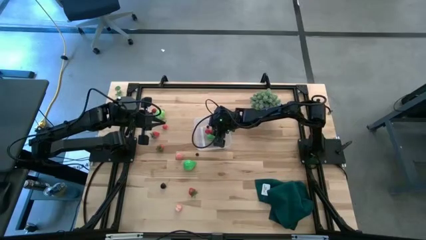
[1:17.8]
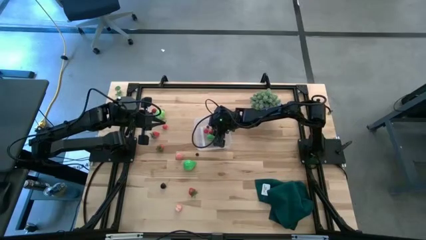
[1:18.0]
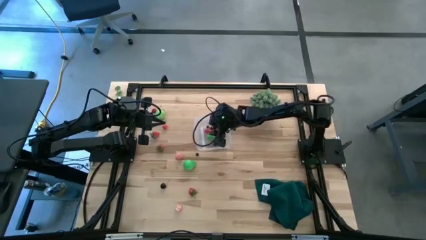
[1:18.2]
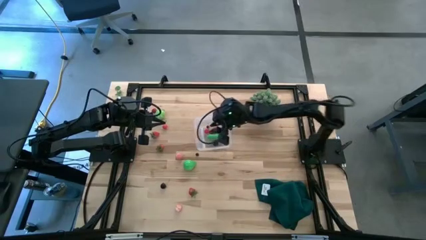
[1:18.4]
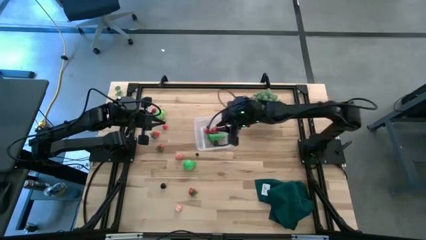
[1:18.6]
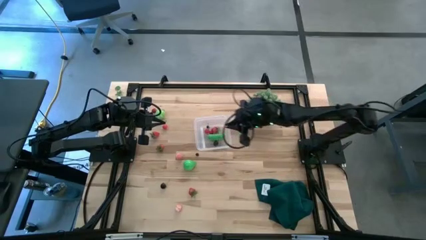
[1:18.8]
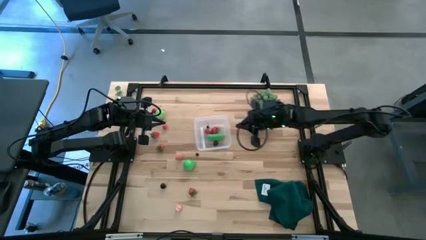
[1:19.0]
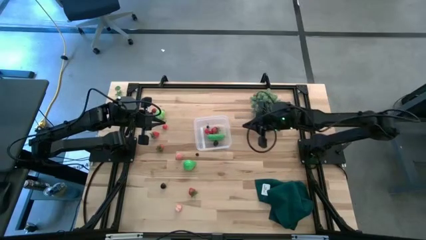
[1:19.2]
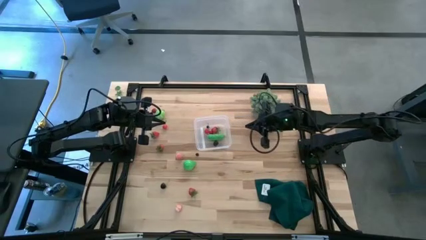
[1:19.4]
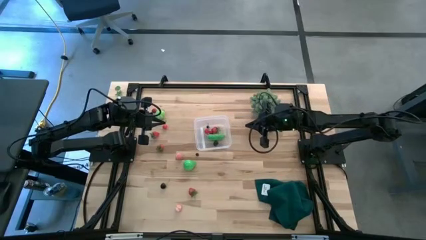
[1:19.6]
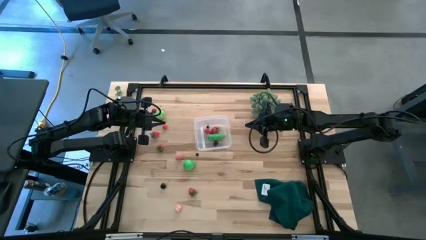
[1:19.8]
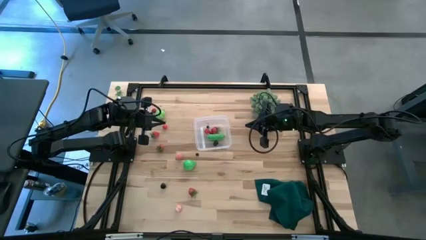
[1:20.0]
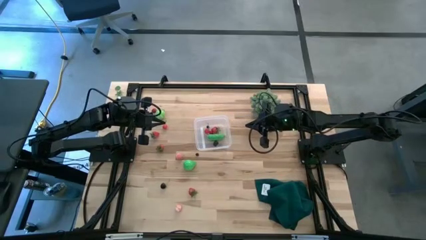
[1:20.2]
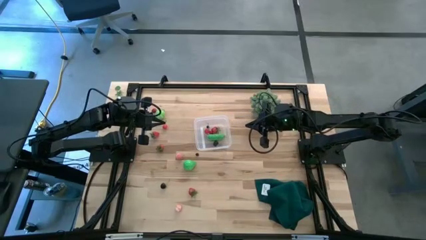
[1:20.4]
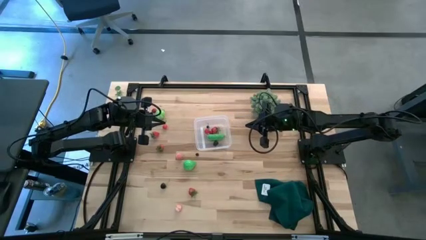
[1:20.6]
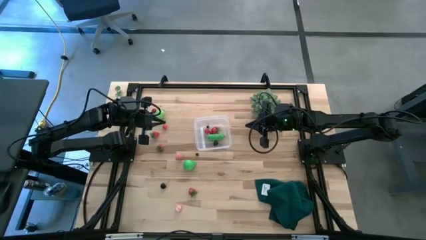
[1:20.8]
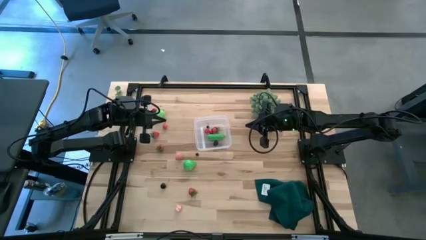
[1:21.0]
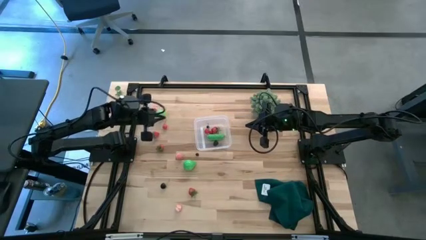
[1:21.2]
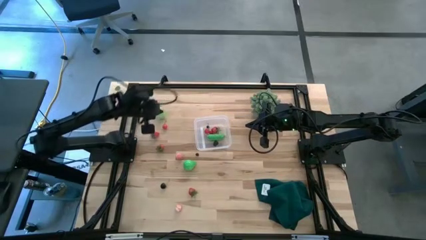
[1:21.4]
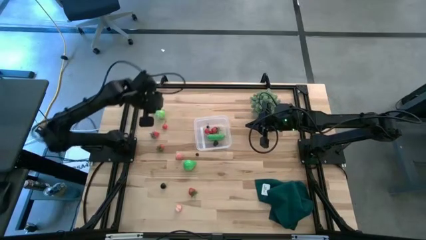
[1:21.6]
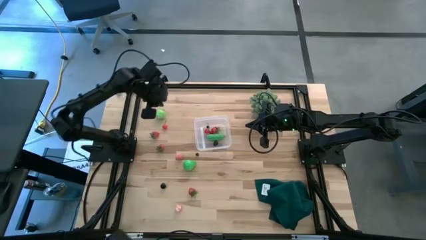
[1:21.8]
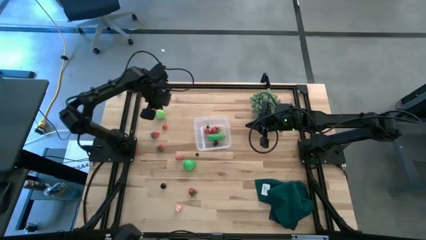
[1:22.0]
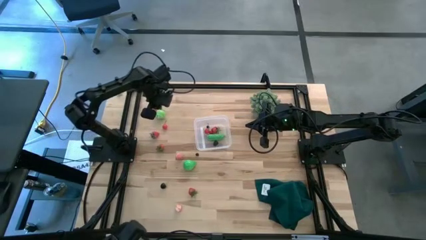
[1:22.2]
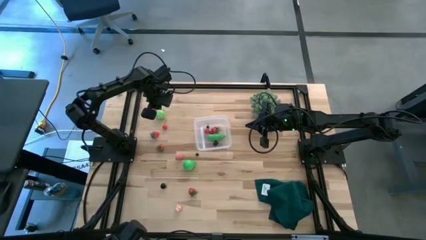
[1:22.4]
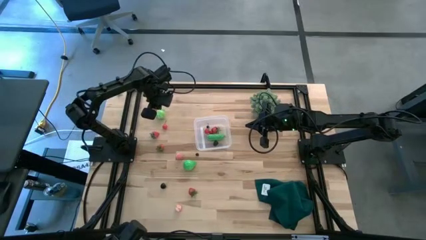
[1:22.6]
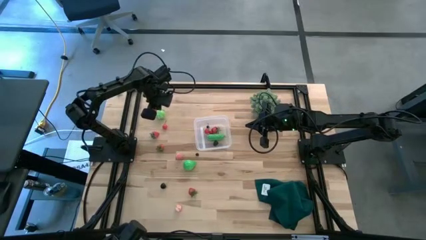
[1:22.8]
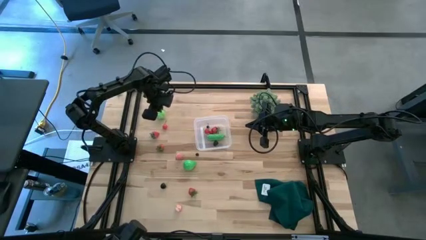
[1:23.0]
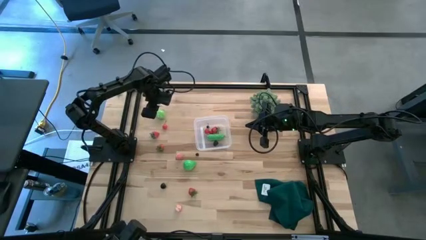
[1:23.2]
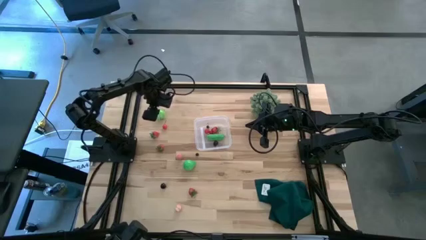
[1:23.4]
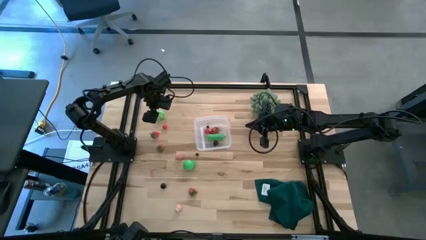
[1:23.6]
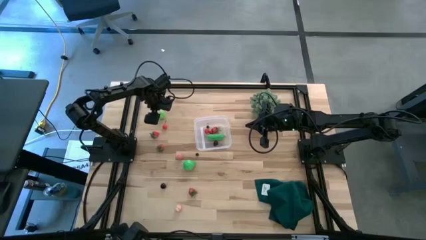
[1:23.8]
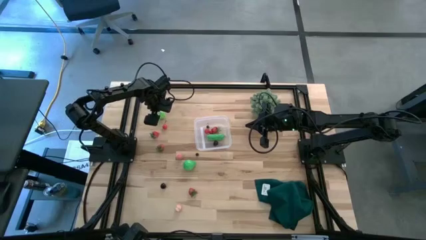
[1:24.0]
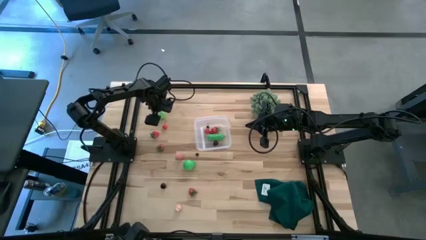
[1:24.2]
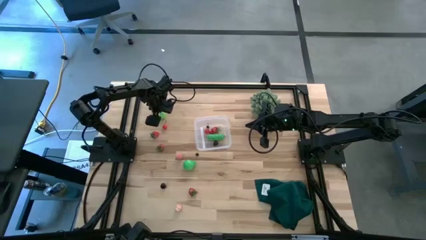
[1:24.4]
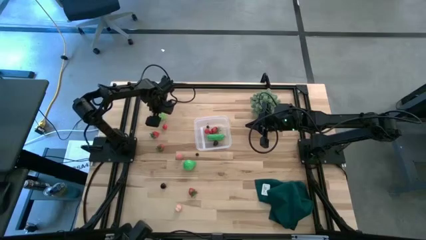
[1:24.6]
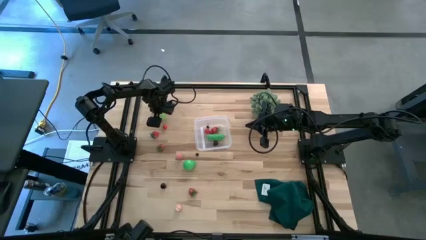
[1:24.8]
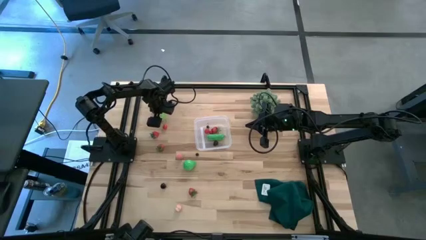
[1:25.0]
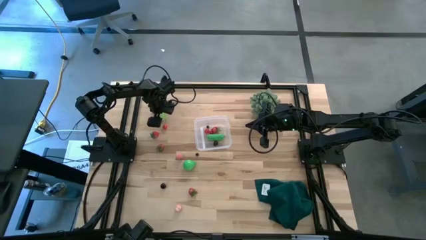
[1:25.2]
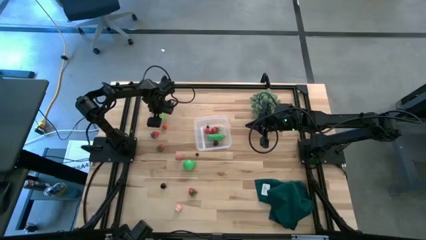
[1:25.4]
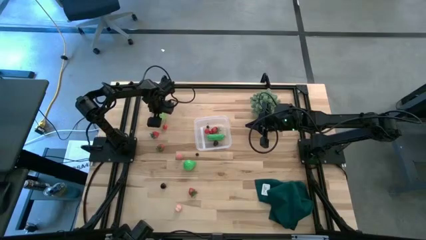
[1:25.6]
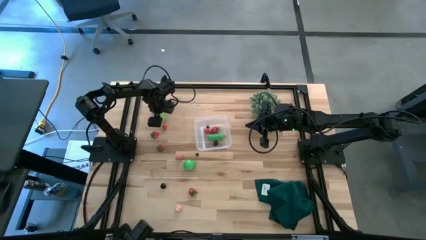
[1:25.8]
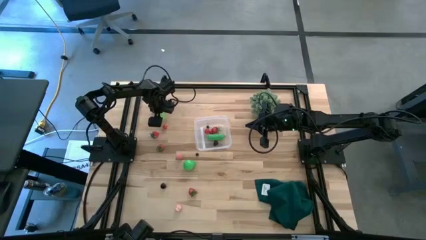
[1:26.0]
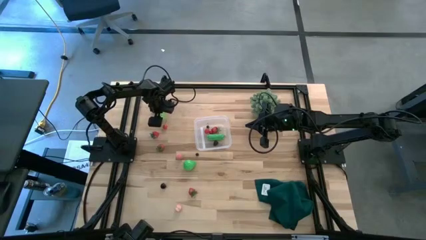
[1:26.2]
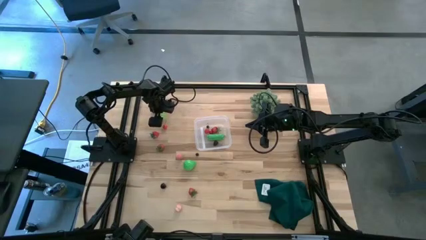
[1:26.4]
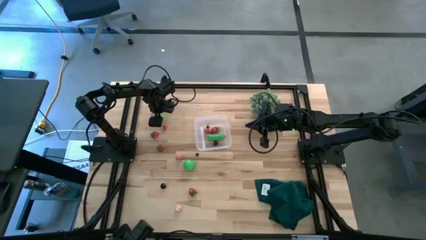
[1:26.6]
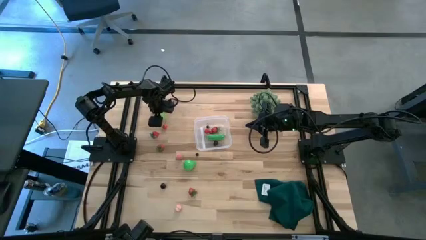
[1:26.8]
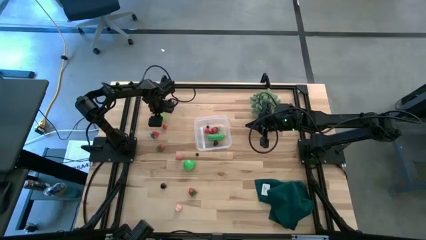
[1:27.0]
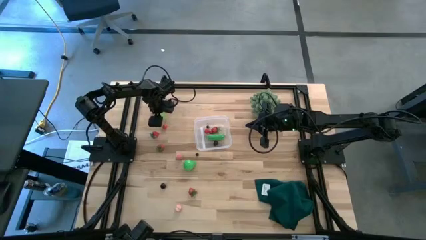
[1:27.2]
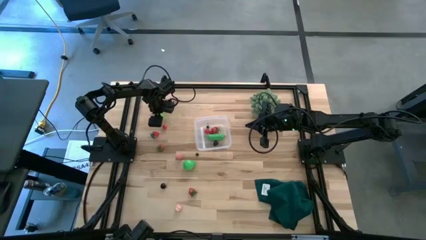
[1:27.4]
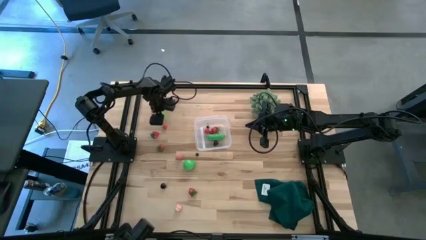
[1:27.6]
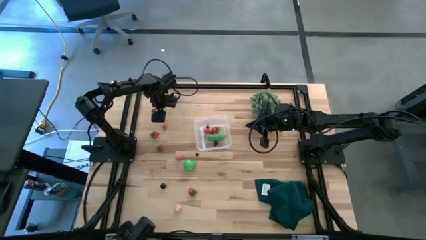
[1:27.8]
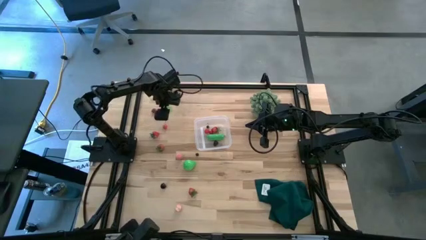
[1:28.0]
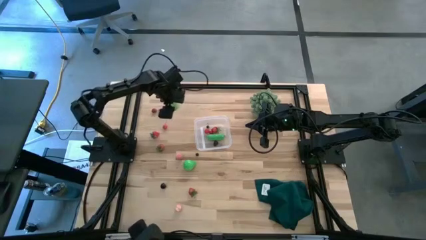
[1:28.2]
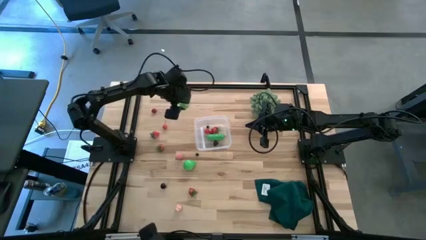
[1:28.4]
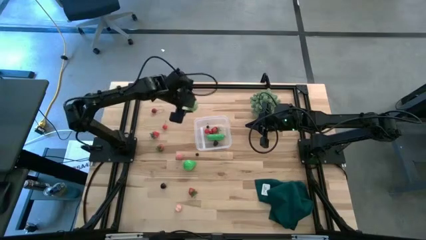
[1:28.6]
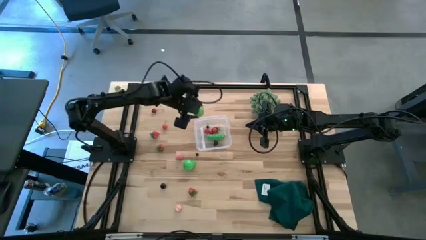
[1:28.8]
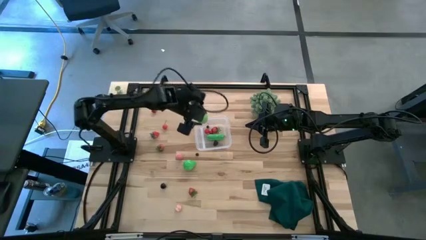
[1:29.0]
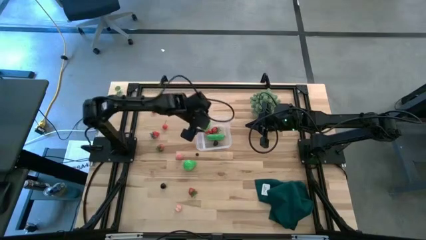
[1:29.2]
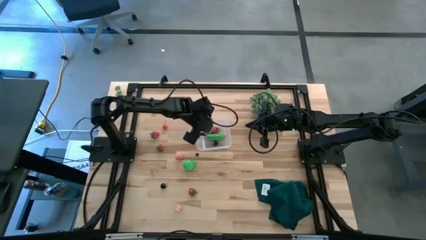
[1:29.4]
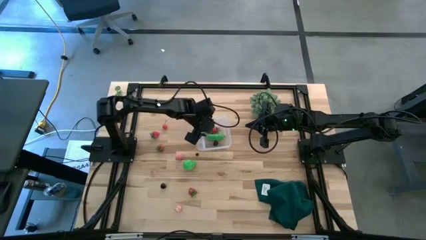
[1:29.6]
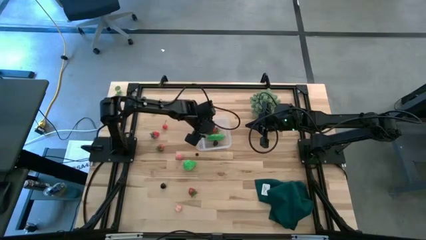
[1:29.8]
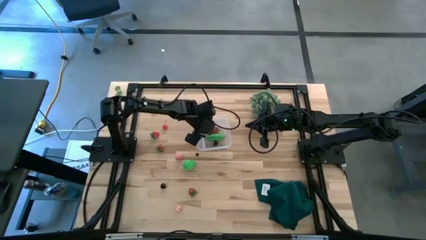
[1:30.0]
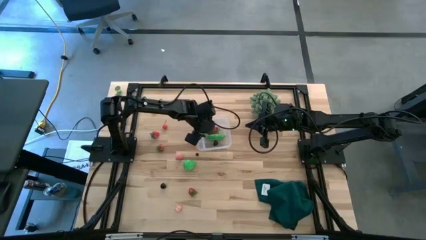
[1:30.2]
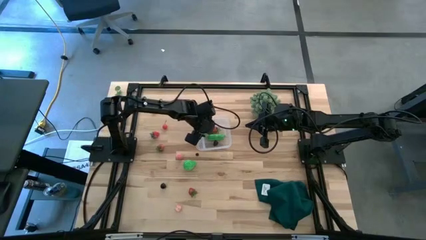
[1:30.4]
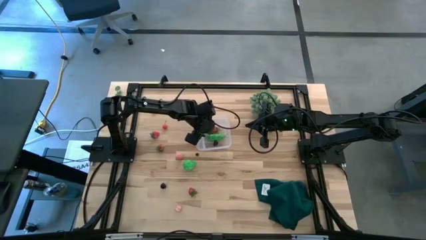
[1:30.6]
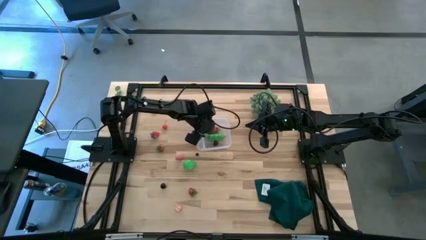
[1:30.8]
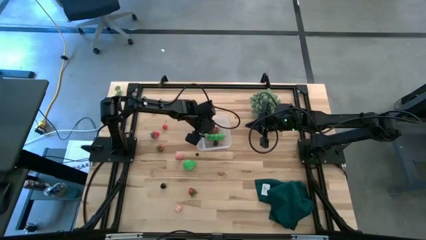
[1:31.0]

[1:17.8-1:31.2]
Task: Pick and placing Produce into tupperware
Put the cabbage into the transparent bin

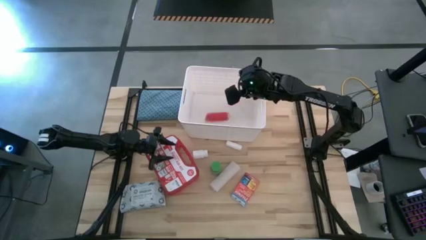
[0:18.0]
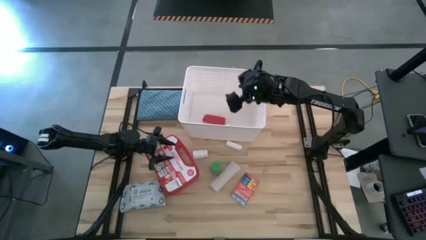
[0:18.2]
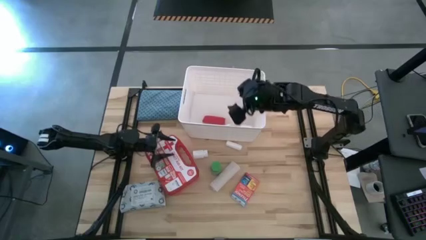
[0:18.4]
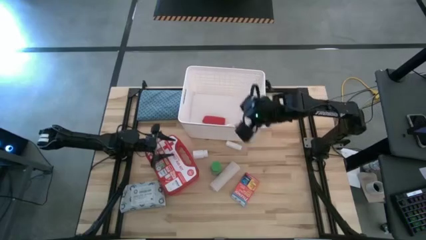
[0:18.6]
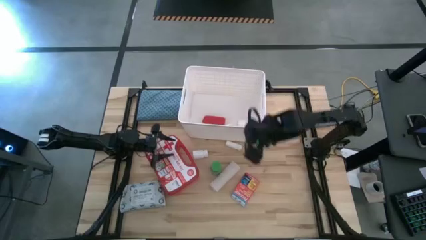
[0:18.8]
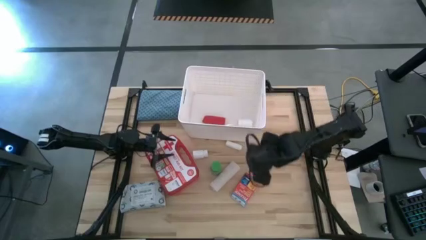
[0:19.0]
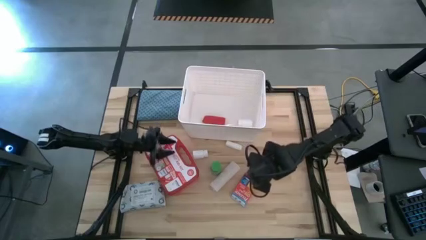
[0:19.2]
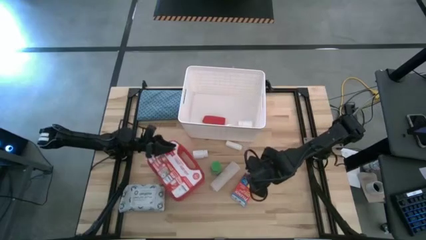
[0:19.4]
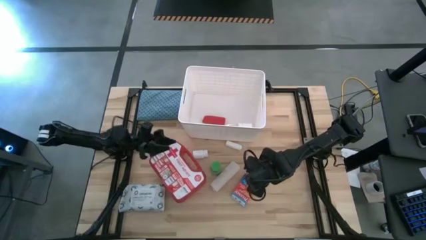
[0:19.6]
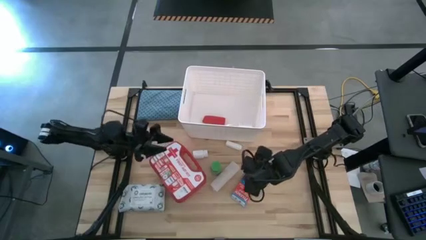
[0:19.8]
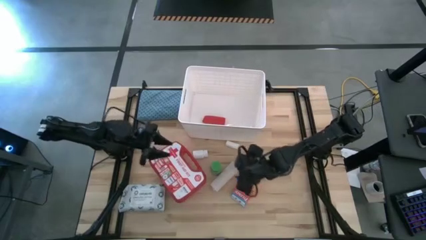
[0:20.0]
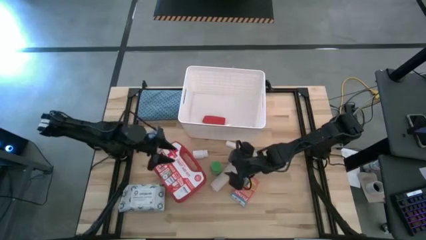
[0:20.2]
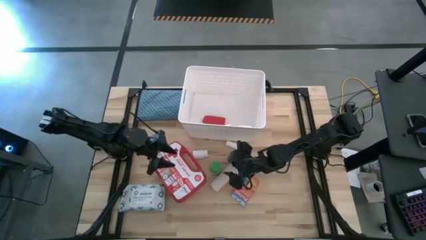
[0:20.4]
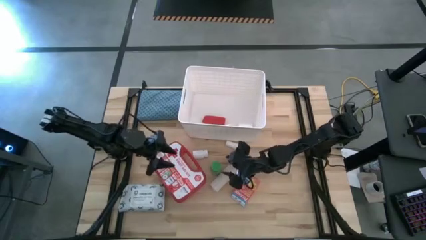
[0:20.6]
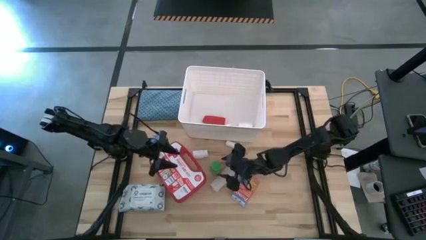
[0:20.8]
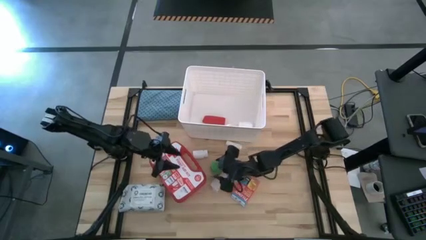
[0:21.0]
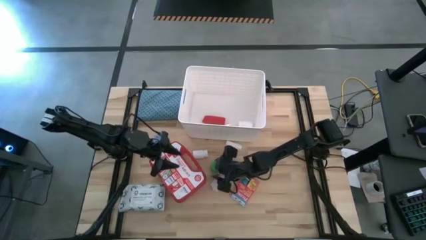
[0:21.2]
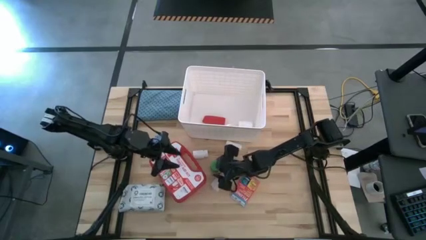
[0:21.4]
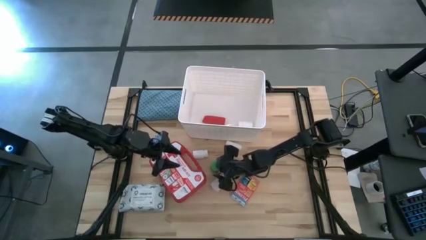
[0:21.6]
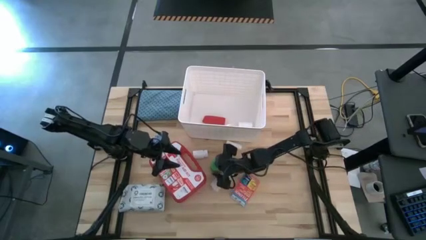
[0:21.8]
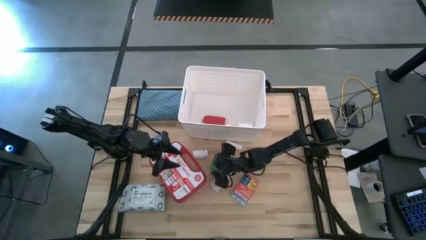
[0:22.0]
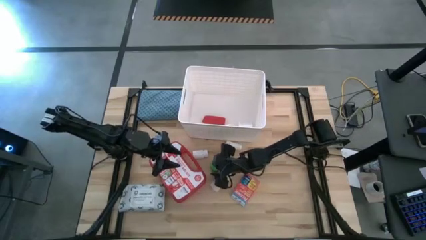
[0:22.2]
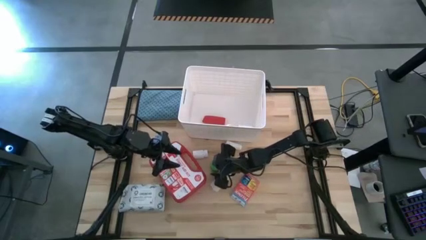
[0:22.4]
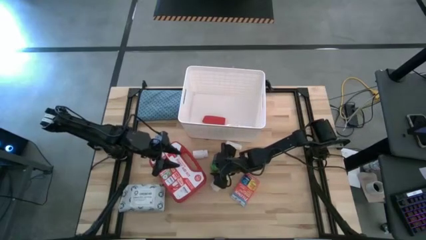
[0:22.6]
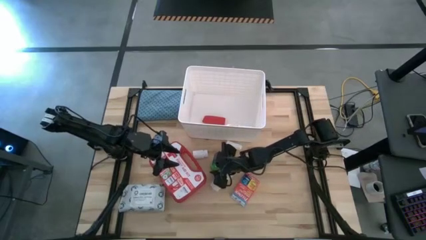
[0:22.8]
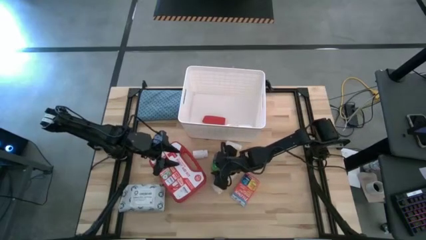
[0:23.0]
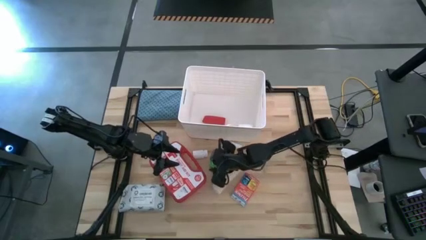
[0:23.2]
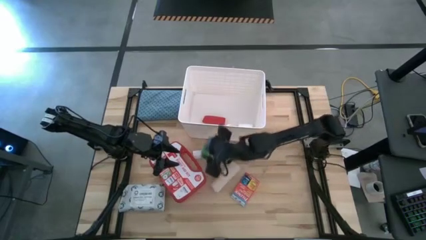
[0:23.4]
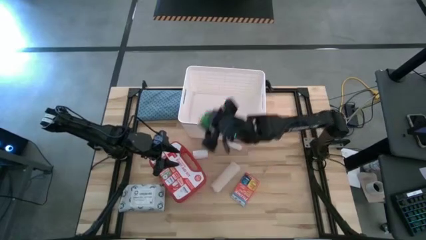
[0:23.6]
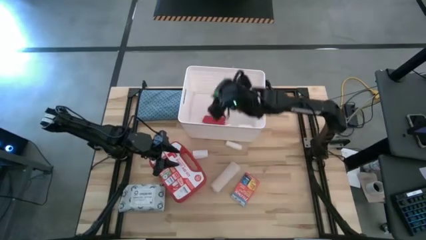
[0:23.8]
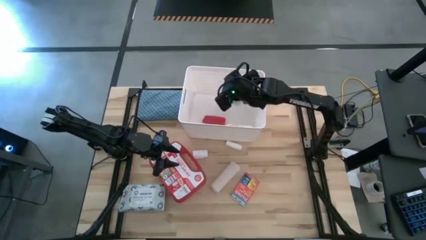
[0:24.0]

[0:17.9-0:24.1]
Task: Pick & place medical supplies in basket/bin
Put the green pill bottle in the white bin
